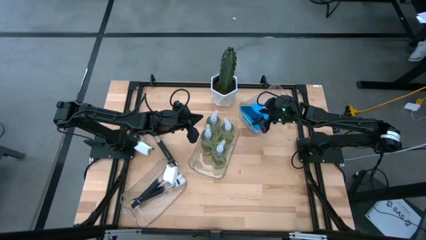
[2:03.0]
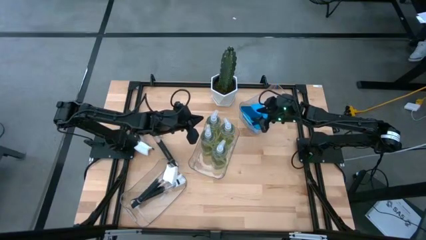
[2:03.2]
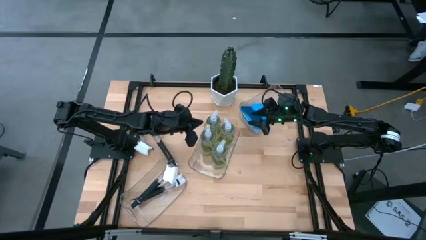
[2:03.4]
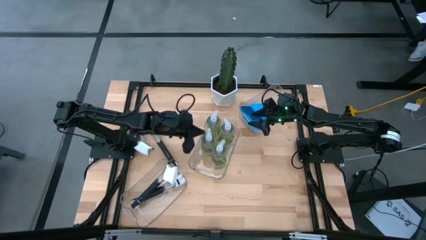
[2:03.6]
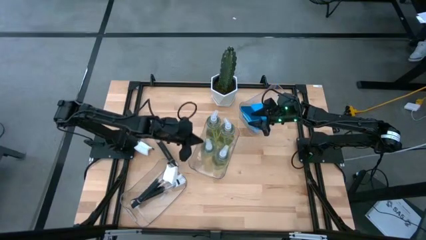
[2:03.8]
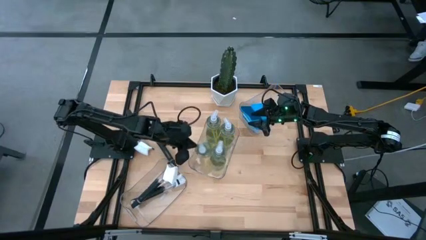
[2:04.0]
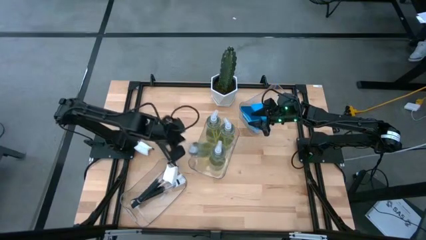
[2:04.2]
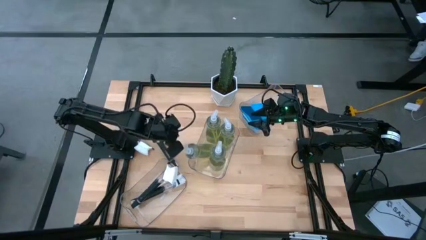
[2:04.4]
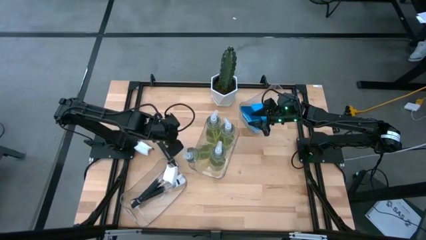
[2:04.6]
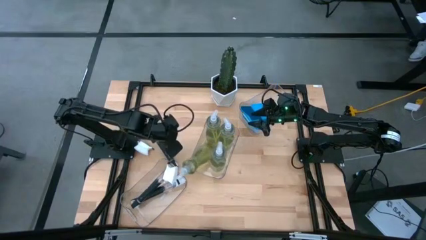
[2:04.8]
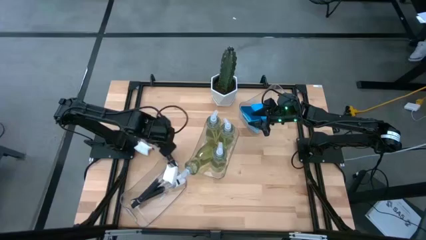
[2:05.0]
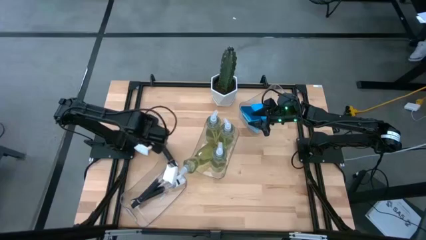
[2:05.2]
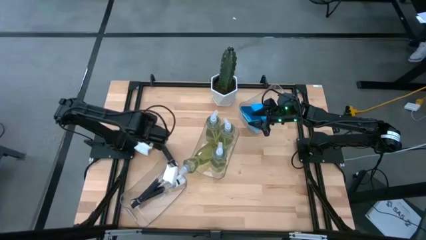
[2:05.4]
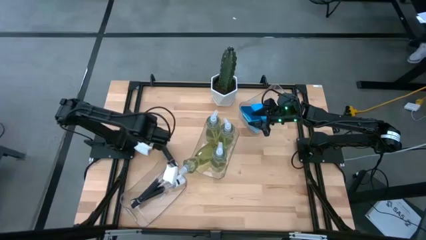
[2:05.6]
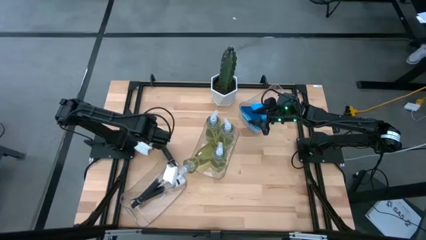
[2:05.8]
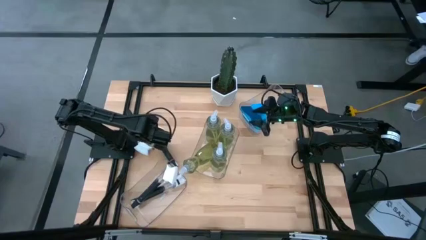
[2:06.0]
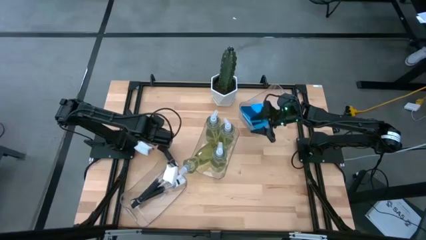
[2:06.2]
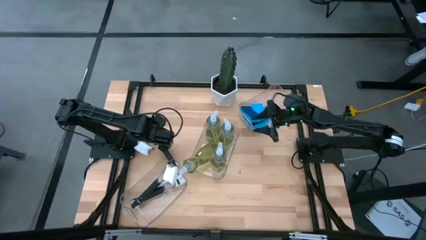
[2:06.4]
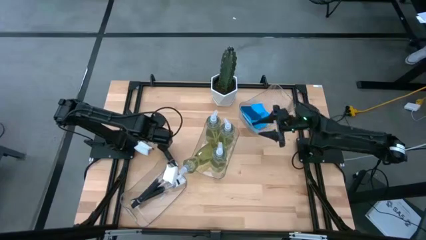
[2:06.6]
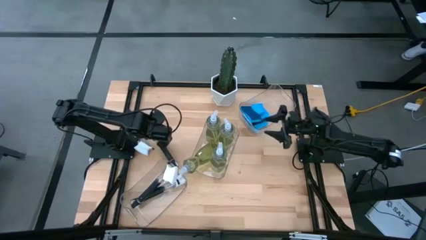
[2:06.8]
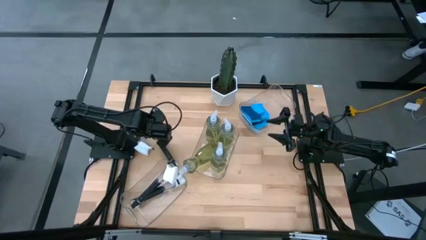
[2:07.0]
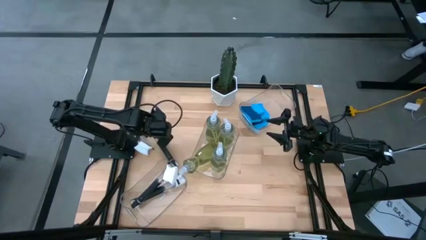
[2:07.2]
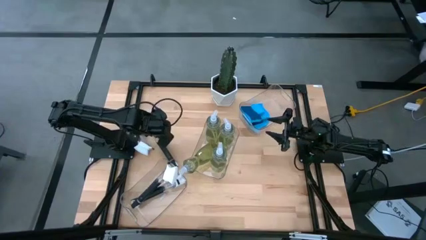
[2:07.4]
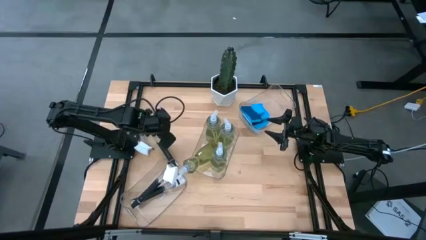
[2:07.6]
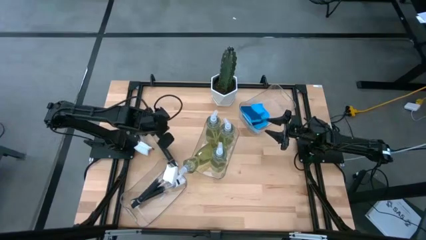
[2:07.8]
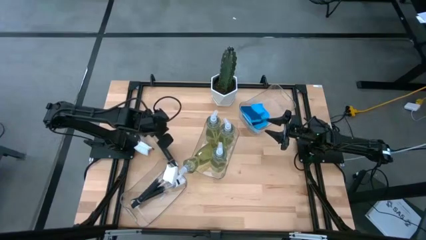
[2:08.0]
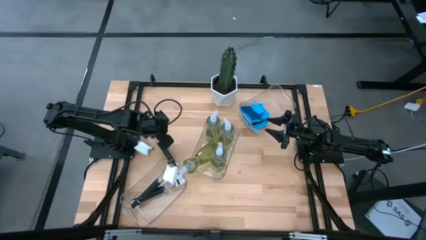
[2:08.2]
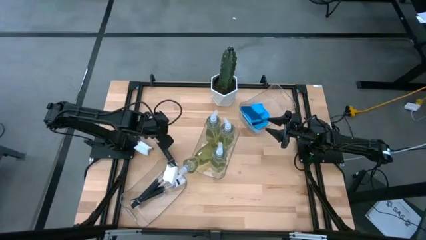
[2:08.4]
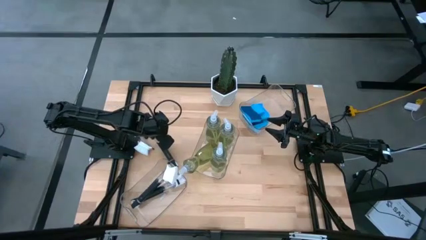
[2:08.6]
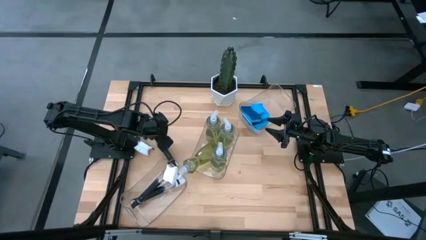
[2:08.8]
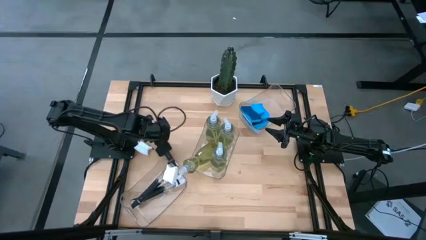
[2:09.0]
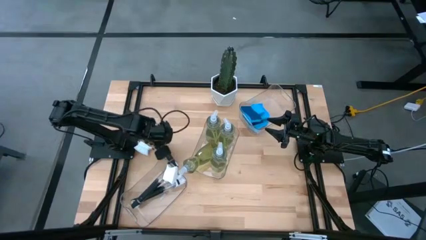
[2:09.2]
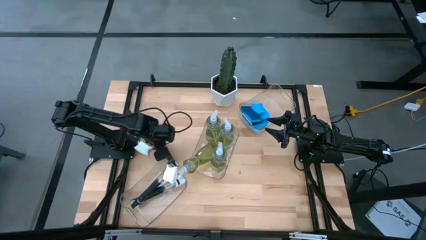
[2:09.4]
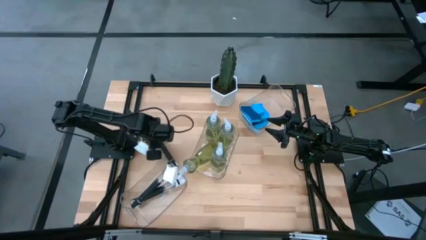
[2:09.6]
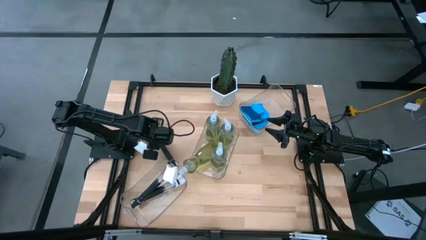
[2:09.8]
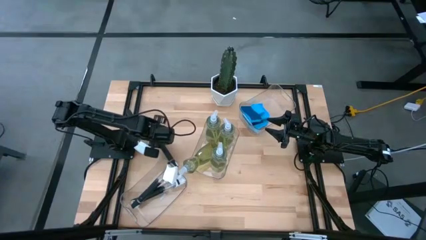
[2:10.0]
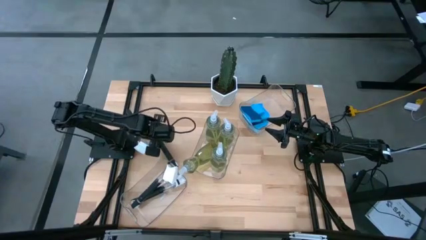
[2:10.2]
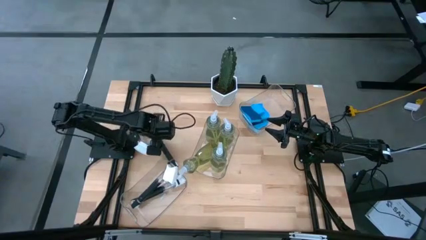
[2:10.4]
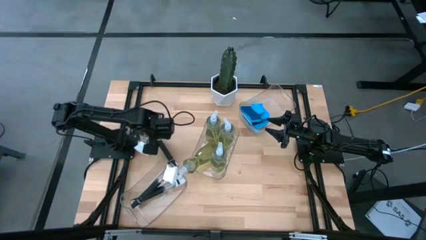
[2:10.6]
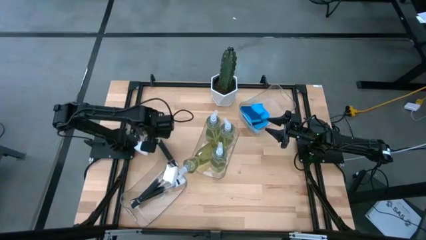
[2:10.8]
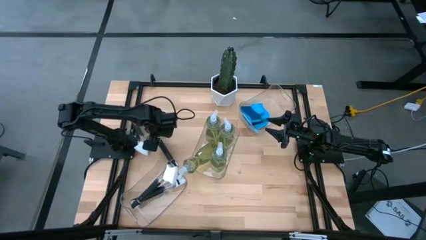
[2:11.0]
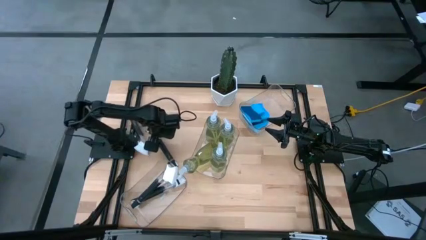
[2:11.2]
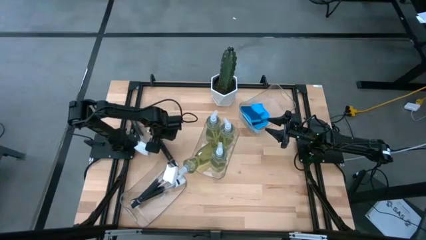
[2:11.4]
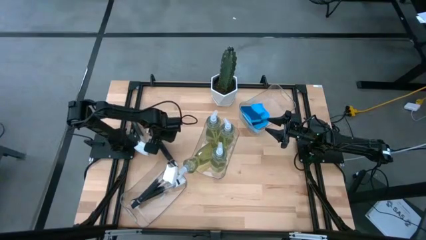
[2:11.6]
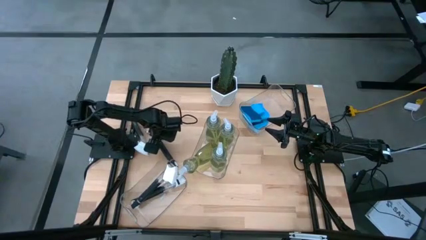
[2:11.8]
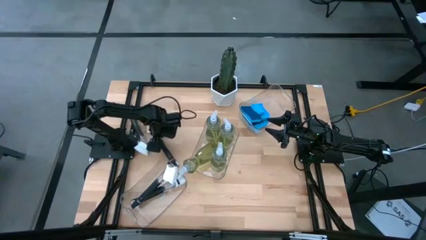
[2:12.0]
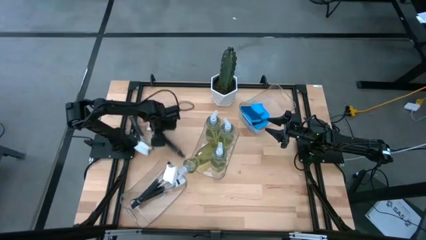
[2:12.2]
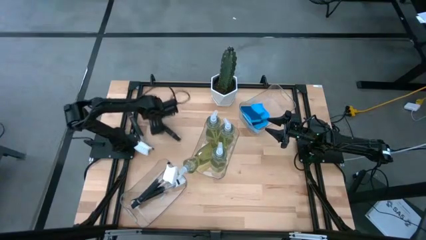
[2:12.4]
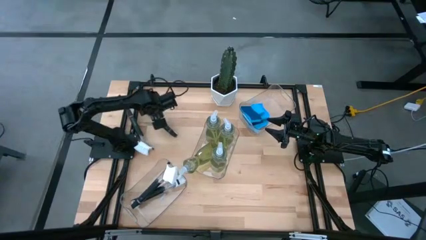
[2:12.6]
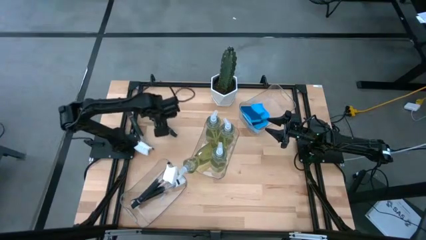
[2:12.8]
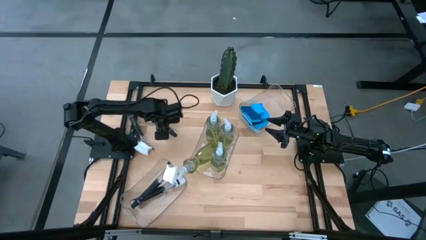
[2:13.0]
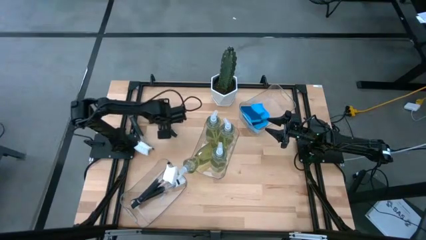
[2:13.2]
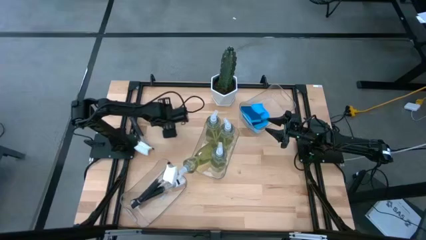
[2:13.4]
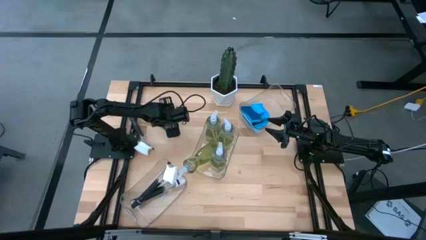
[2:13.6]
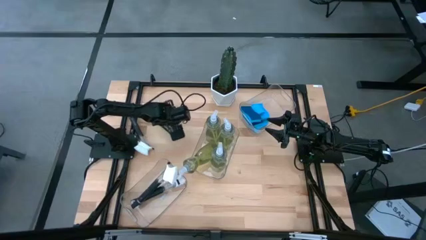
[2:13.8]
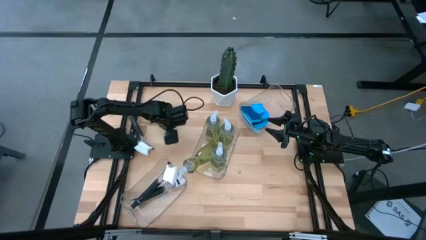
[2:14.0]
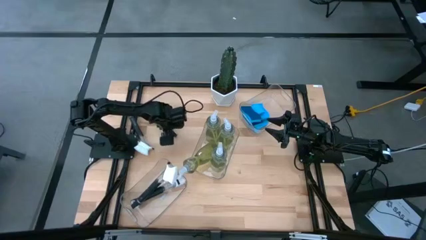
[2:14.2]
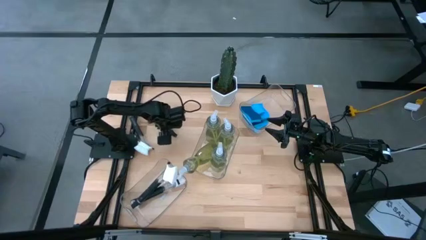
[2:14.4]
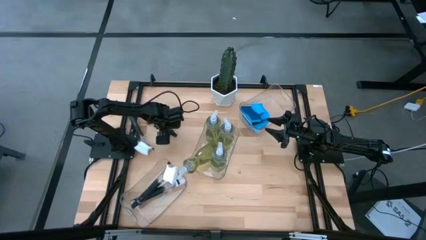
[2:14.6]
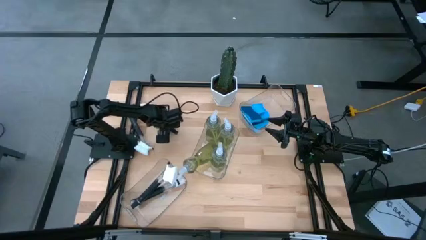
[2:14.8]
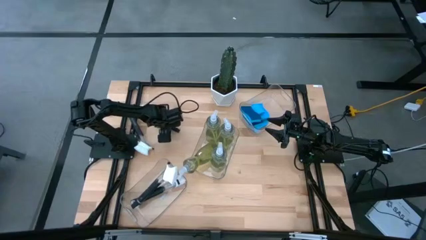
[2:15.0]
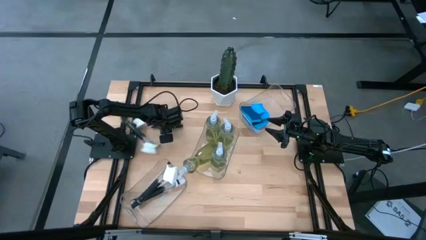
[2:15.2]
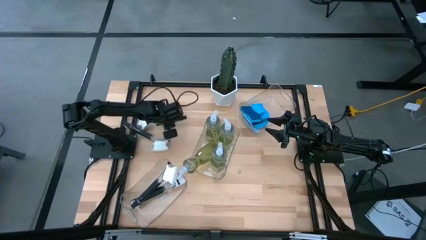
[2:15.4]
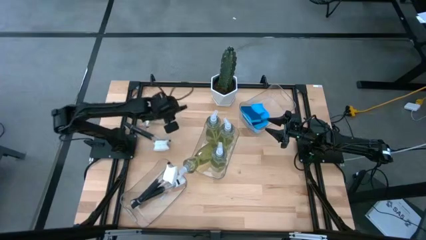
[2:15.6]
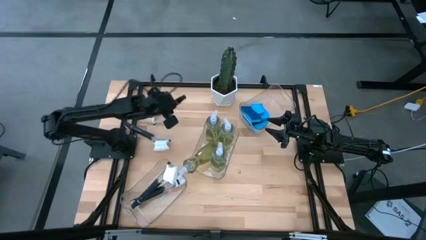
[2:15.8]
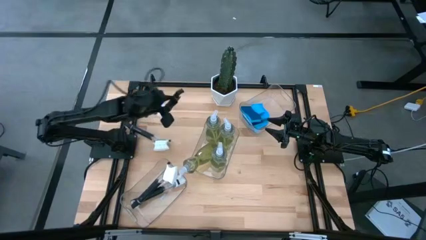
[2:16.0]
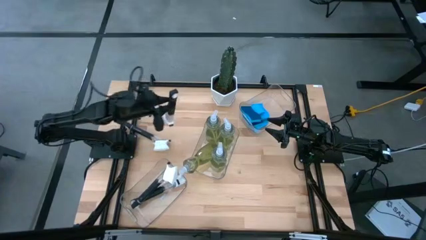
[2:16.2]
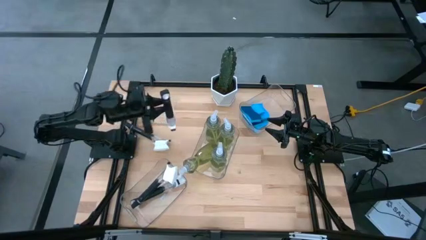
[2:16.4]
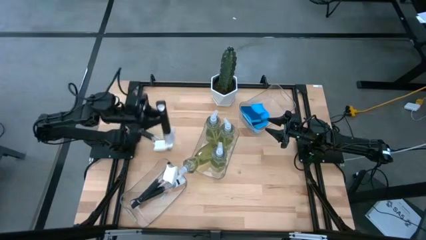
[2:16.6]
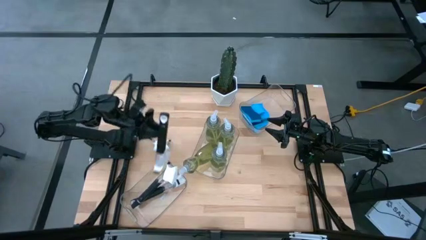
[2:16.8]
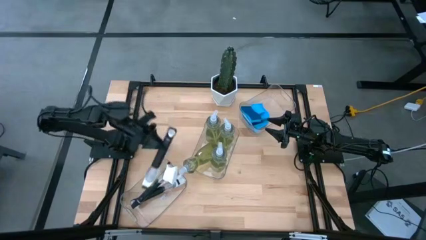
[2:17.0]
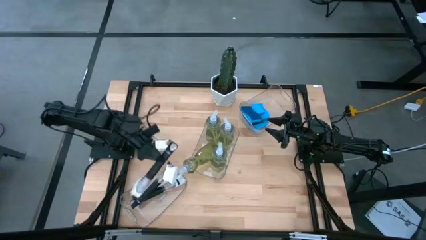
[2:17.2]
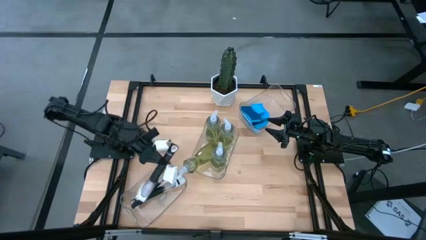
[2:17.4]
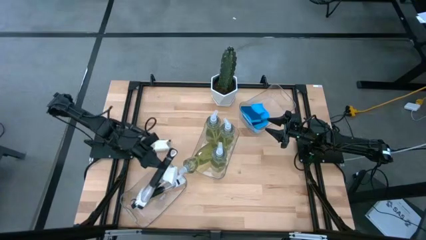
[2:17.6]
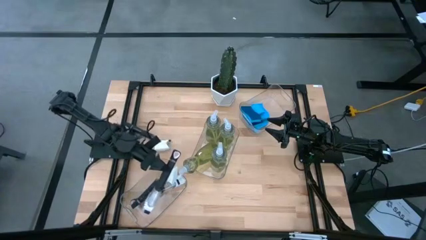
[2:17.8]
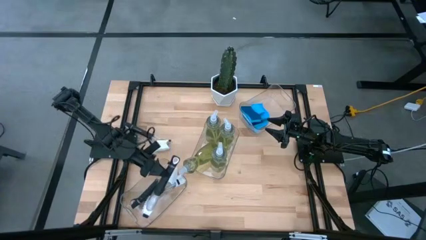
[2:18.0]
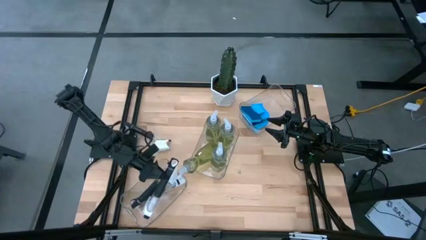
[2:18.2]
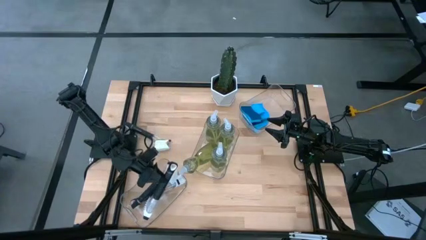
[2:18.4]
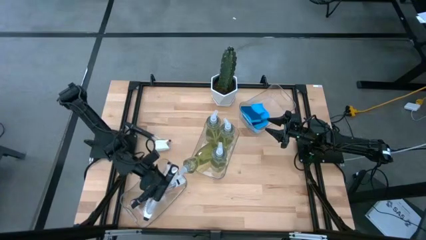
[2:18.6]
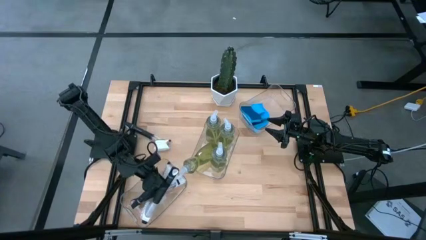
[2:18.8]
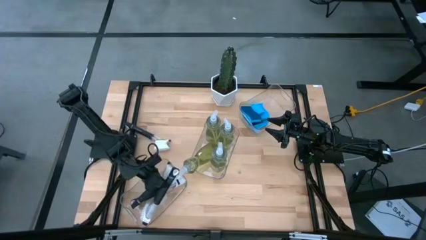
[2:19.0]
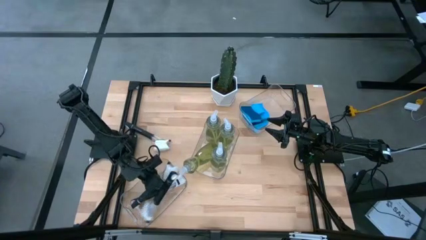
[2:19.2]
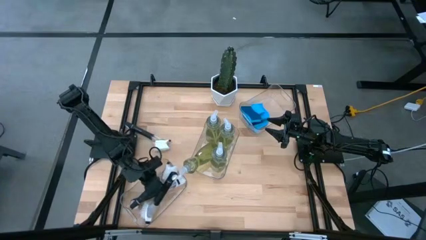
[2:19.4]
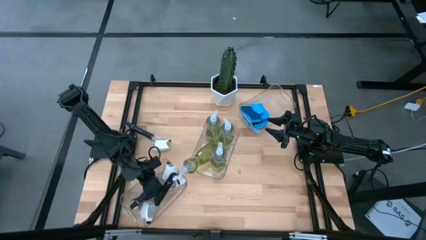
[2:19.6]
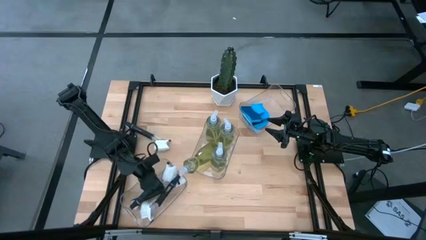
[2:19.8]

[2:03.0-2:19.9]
Task: Pick & Place Kitchen Sink Supplies
Put the black dish brush into the bottom transparent bin
